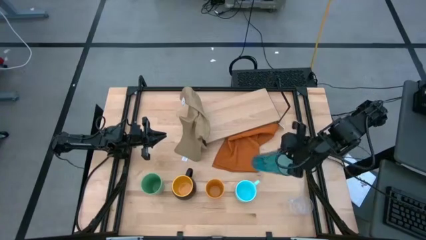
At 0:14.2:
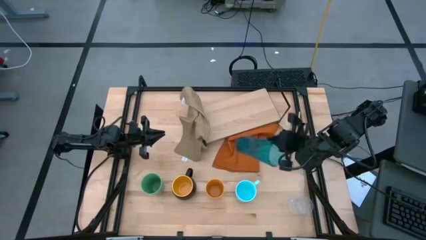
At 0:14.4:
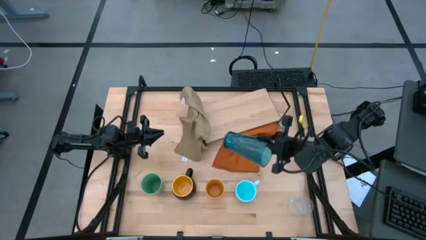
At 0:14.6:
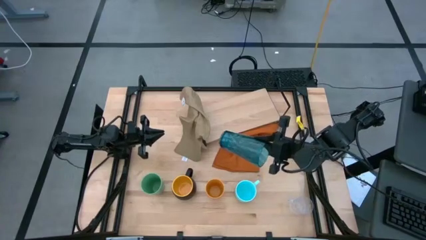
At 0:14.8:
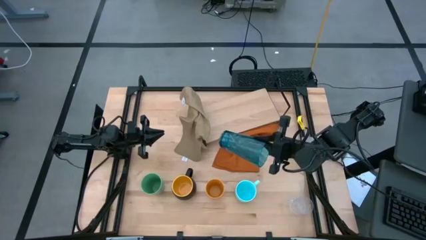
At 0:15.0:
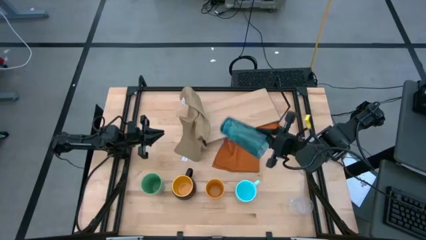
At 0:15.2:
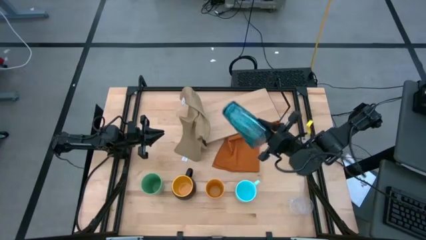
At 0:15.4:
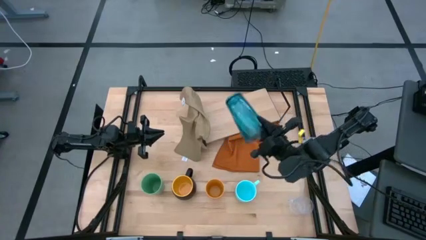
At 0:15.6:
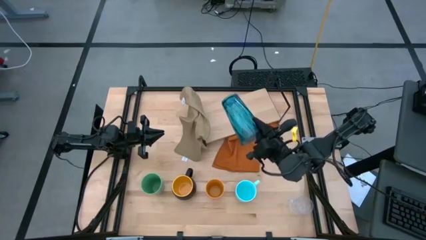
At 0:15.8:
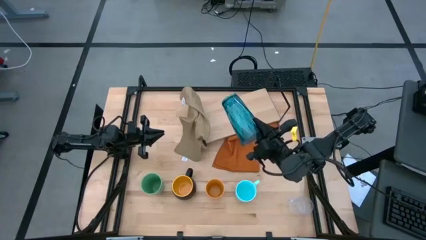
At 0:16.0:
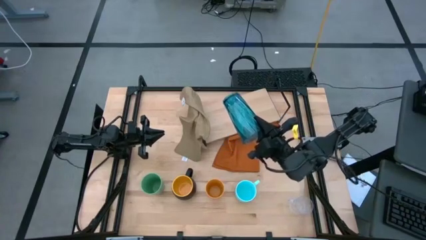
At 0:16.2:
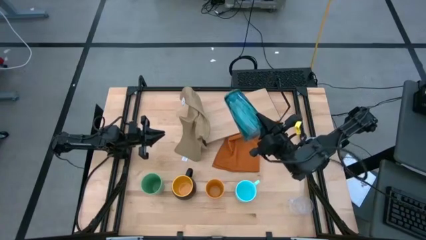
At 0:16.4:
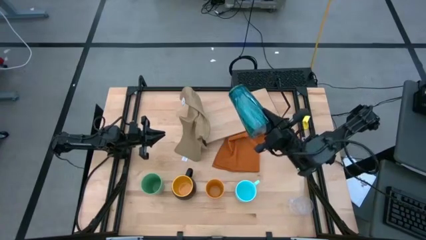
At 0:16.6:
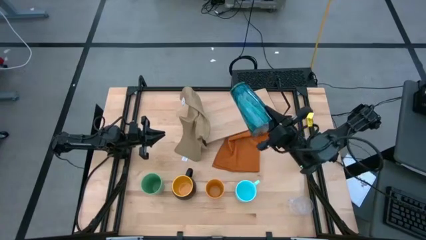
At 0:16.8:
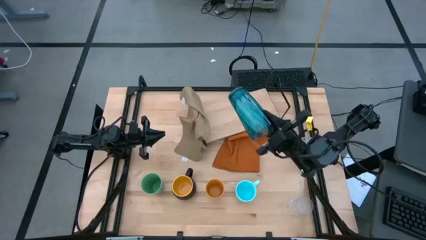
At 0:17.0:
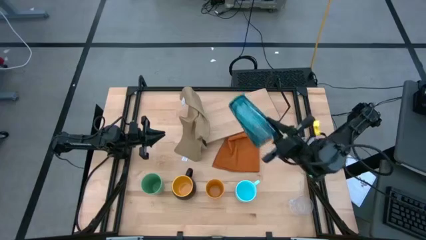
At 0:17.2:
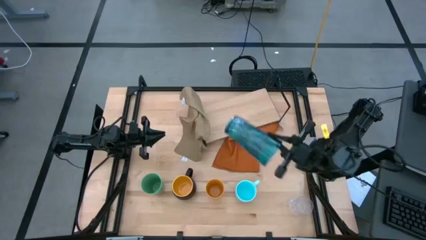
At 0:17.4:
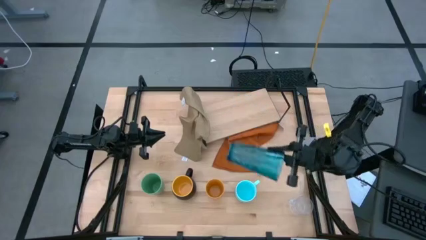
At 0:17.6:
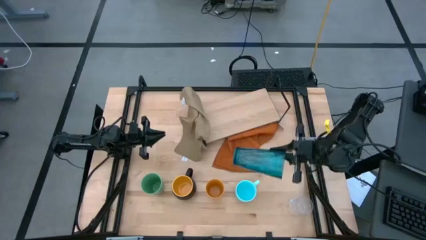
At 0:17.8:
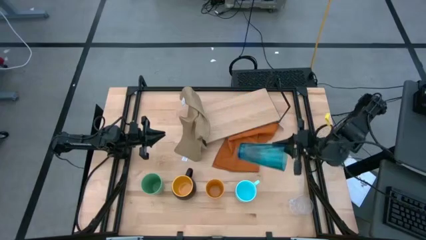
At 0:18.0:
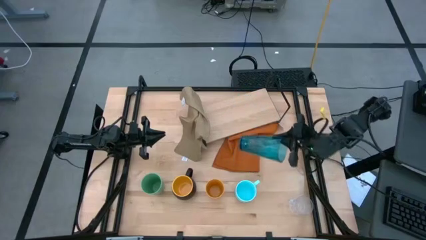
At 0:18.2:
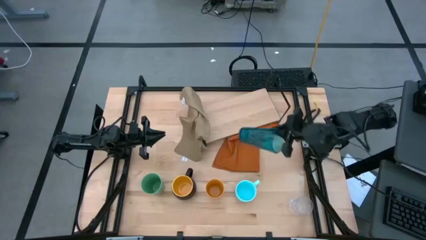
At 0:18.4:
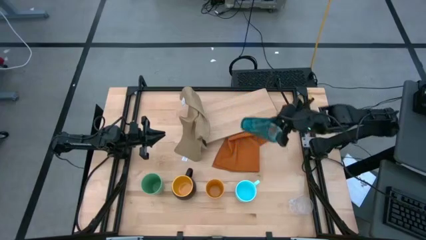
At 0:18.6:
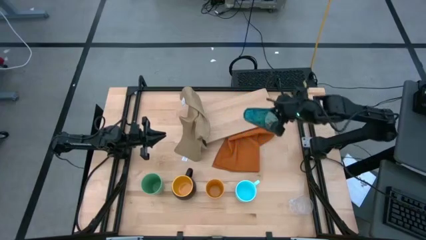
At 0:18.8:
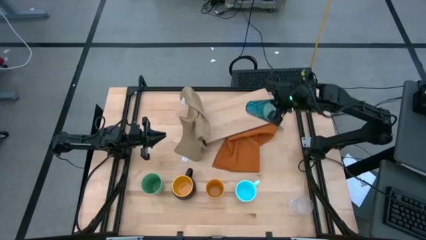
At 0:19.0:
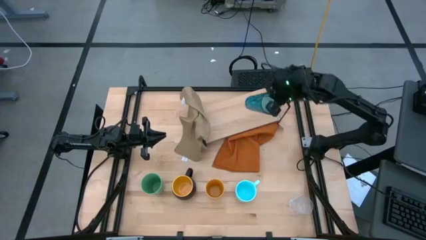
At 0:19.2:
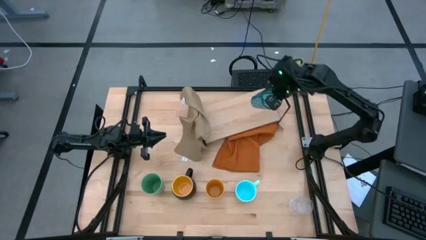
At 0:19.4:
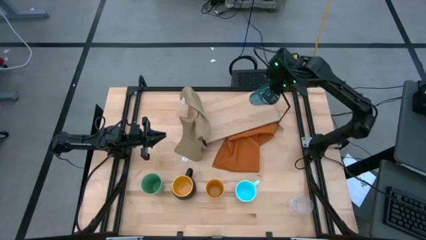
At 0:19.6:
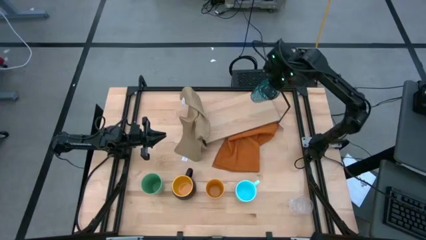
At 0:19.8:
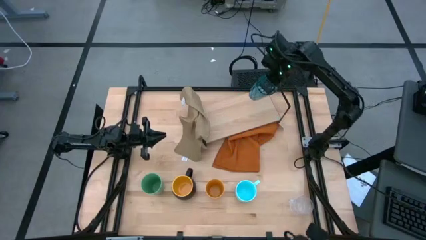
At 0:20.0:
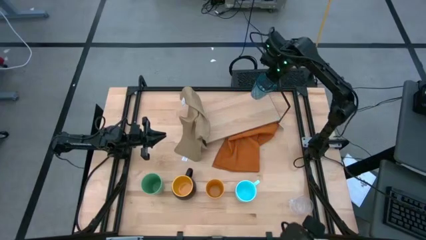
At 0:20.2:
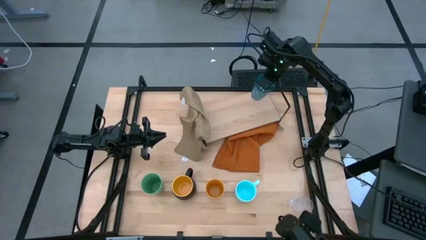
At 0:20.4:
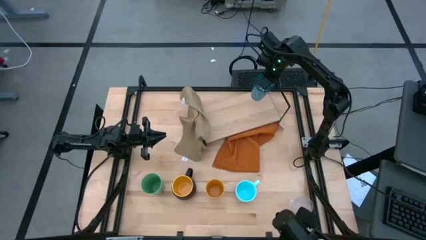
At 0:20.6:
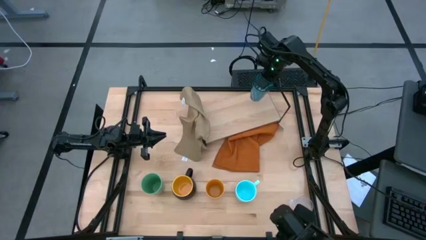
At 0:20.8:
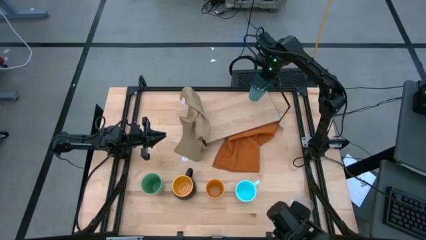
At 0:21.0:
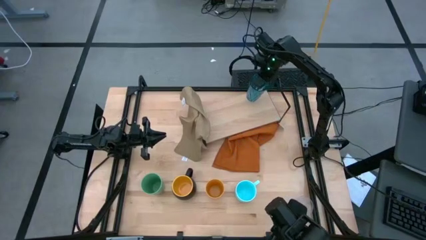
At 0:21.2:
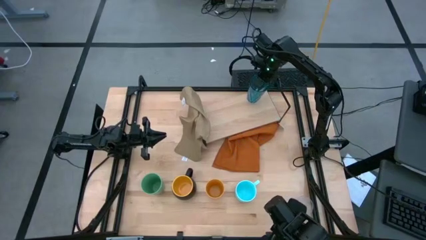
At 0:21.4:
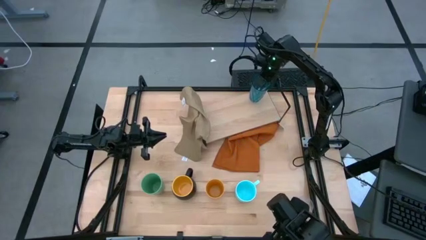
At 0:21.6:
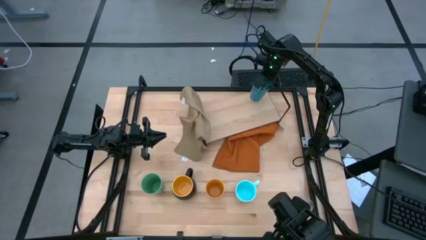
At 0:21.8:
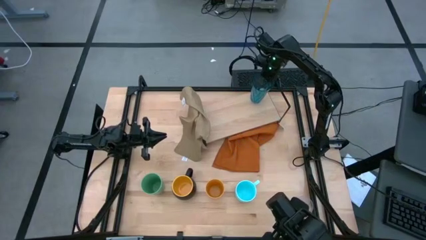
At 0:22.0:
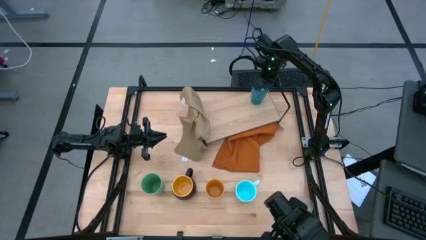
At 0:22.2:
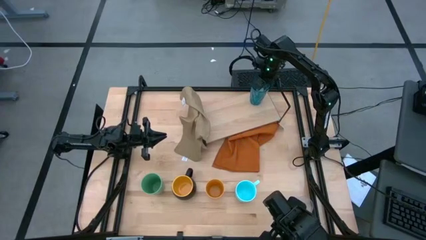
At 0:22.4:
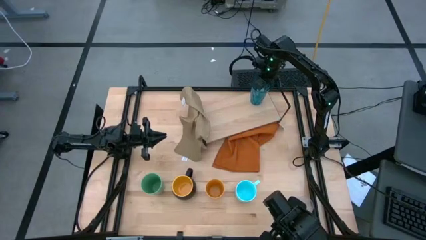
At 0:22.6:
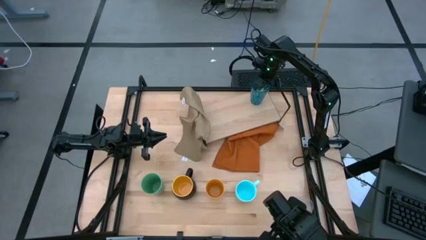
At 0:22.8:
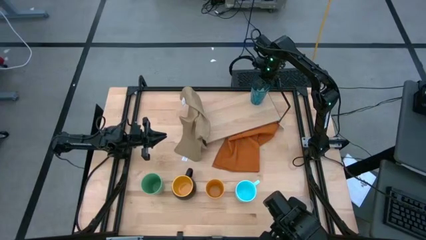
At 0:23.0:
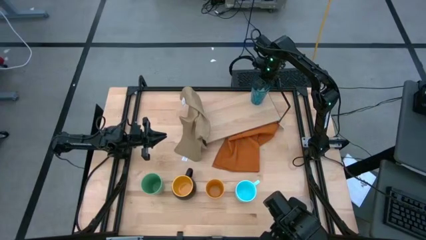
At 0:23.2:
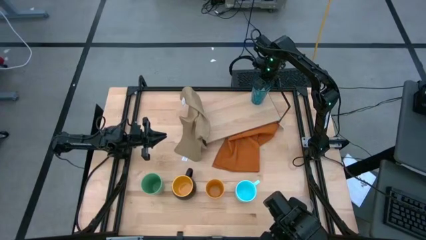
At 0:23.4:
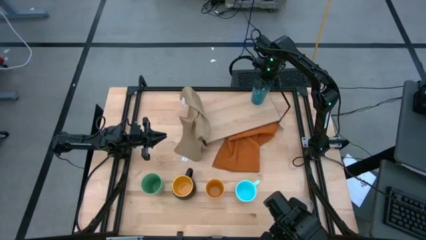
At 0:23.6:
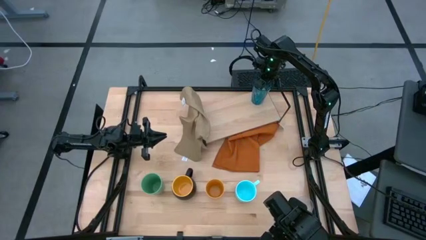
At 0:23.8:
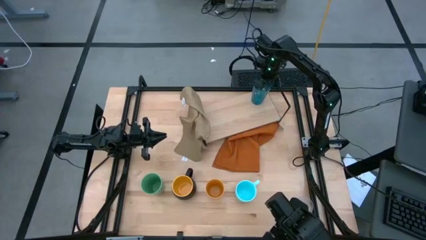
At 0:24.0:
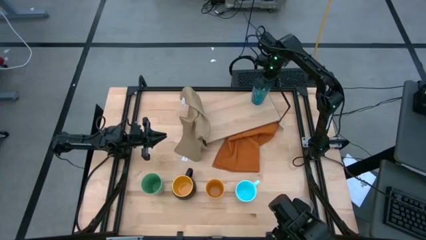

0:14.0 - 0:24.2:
Task: Stack small to large cups/mugs on shelf
Put the blue cup on the shelf

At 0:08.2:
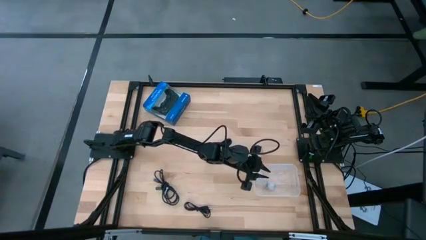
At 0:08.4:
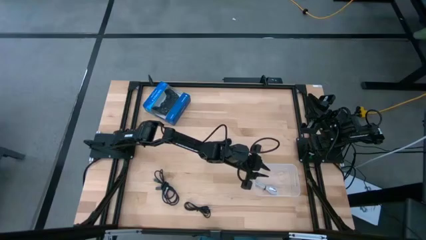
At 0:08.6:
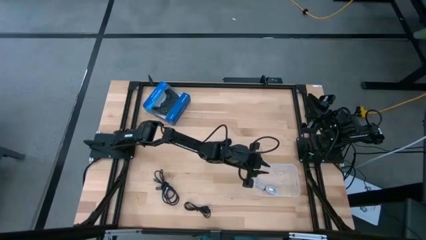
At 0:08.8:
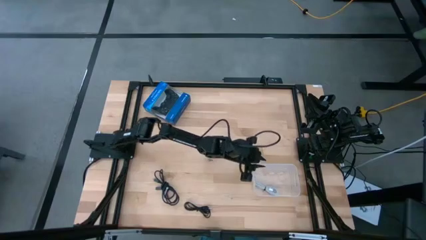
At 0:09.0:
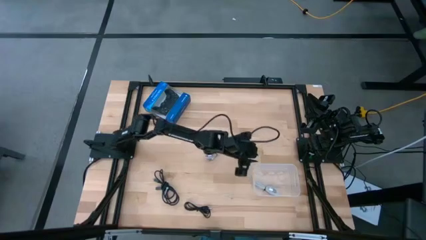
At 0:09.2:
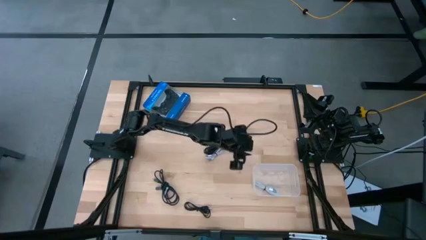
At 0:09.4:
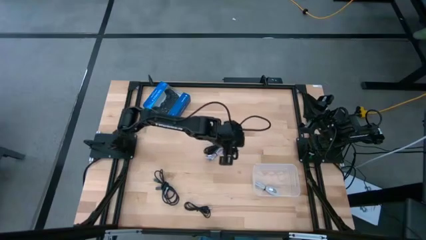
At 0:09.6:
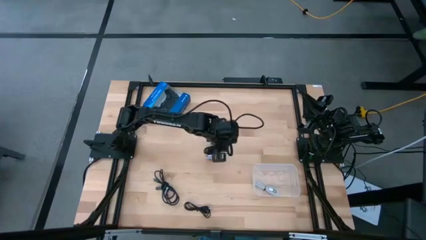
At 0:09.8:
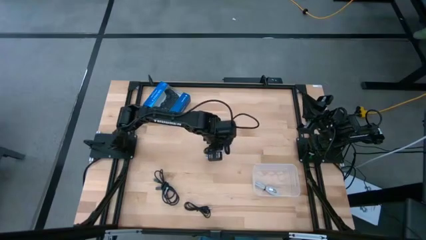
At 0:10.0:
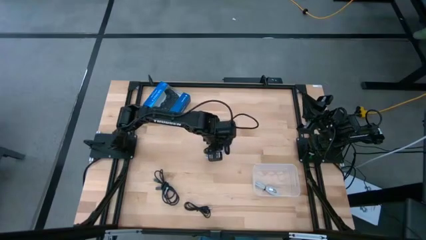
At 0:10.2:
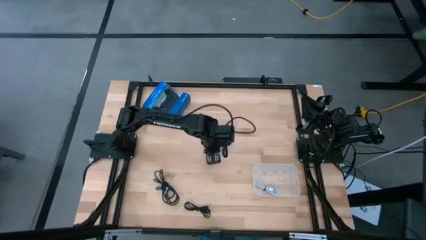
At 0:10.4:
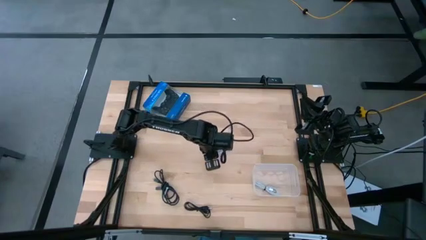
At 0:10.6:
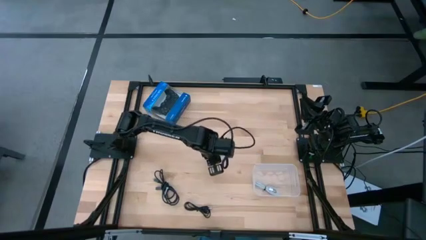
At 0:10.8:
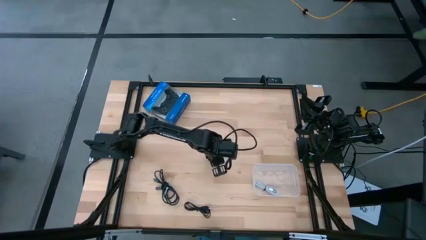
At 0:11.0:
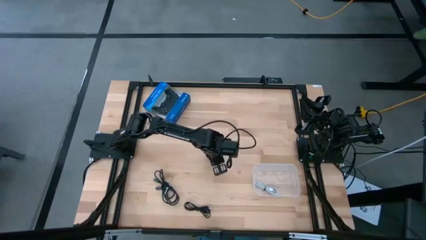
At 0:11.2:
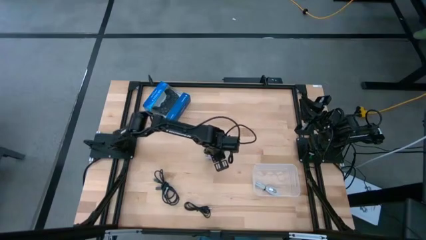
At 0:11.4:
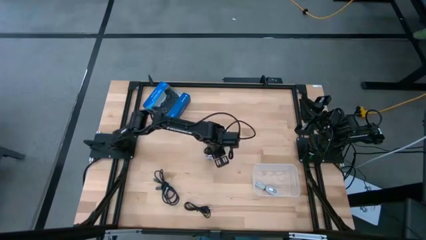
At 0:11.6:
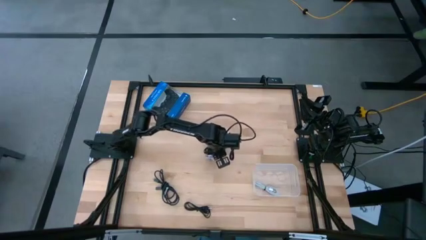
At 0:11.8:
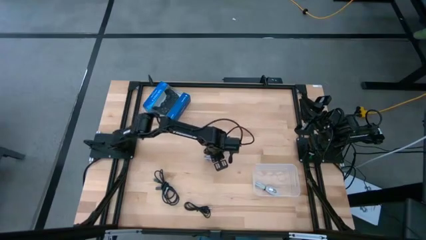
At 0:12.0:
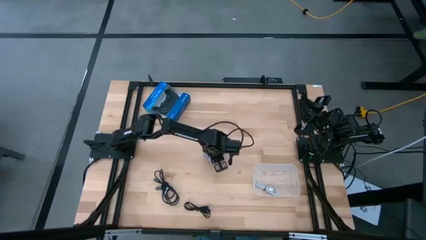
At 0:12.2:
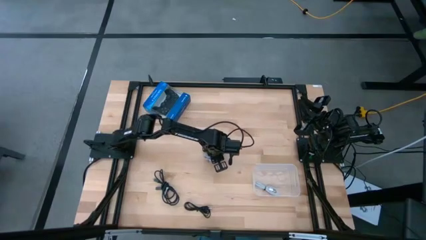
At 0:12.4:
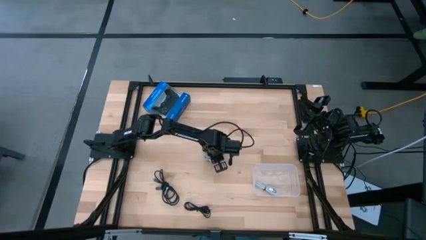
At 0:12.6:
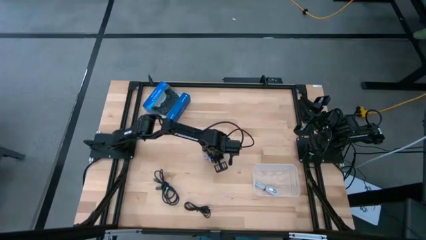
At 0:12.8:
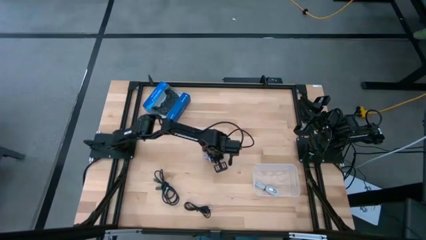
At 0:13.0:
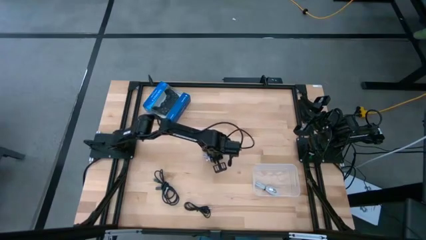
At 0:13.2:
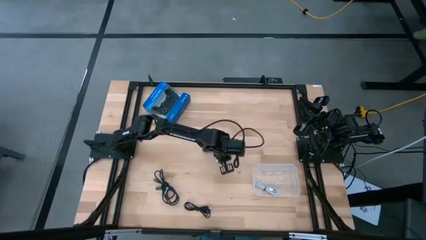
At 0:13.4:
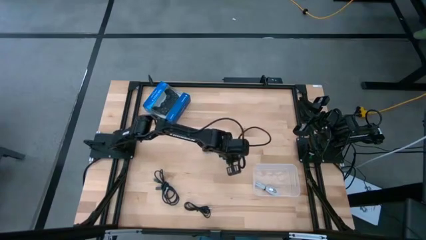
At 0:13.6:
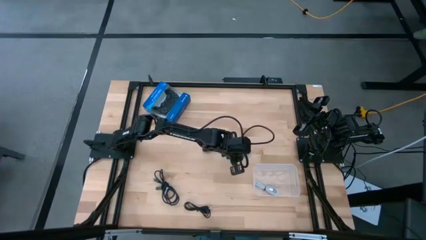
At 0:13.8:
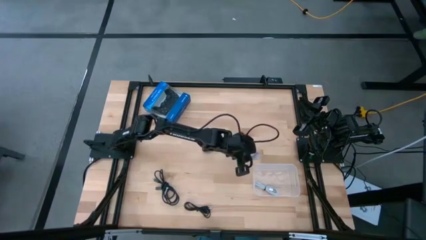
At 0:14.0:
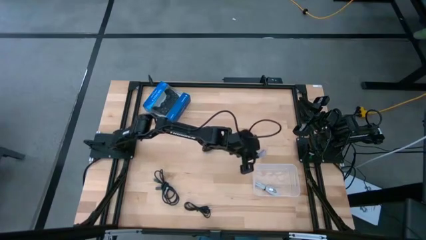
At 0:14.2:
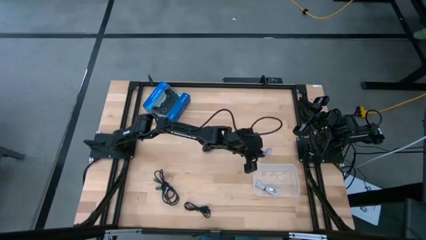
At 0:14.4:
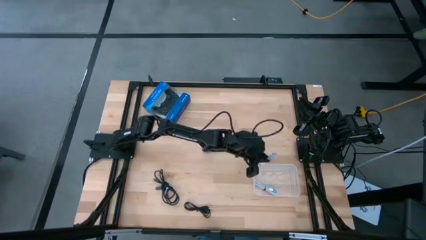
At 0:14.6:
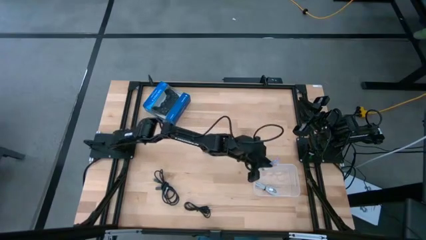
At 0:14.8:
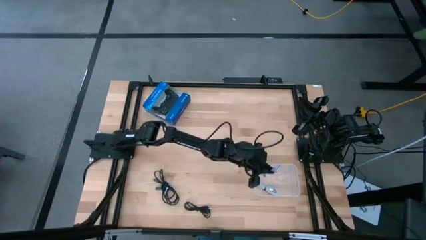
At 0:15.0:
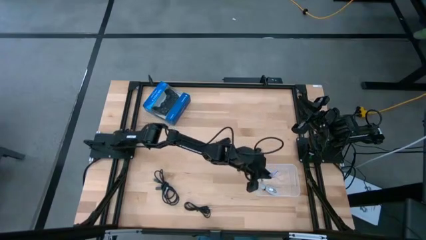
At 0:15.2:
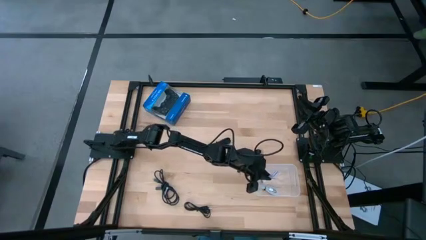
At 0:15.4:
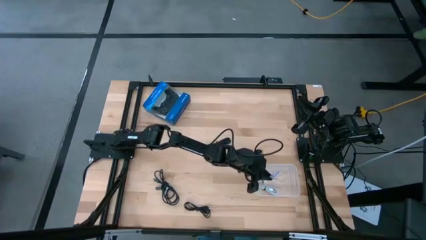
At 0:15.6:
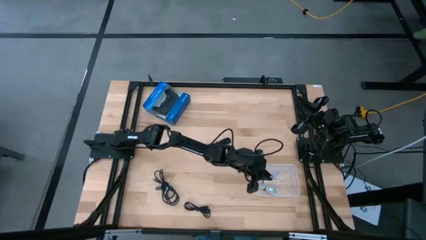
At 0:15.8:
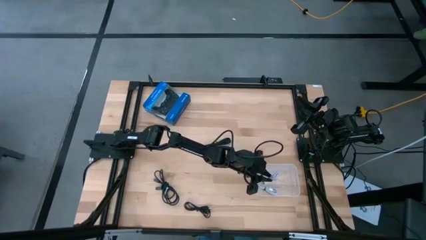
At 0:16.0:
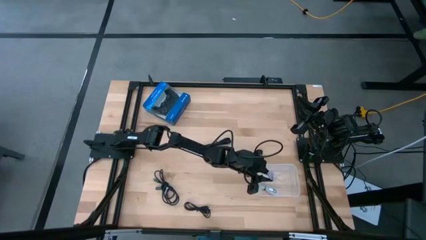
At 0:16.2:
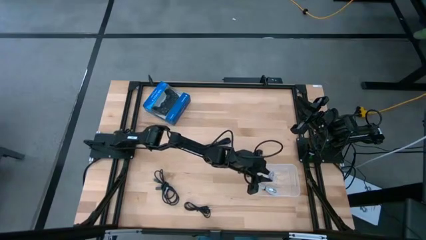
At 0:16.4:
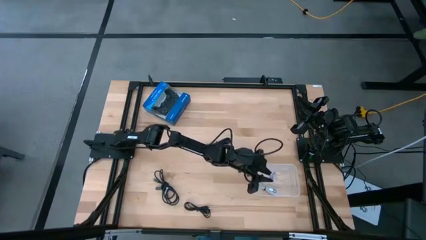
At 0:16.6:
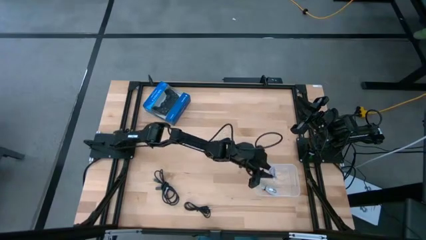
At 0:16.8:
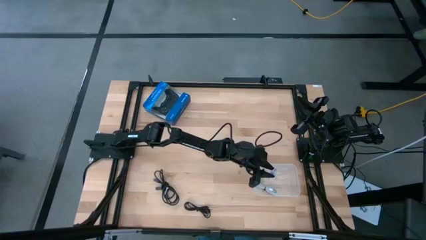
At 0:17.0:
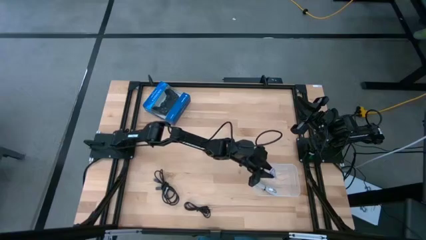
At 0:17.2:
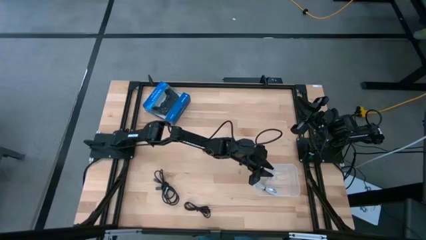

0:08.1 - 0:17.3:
Task: Pick and place USB-C Cables
Put the white charger cable into the transparent container
